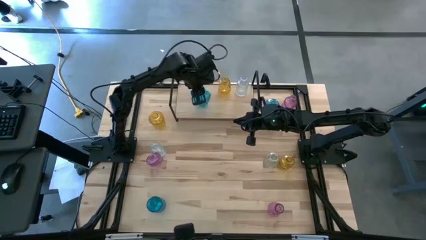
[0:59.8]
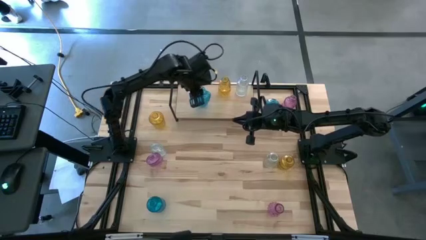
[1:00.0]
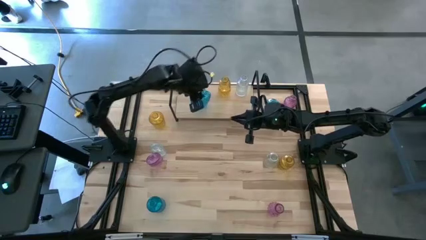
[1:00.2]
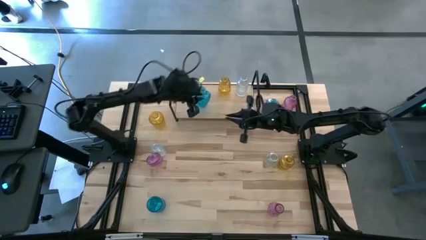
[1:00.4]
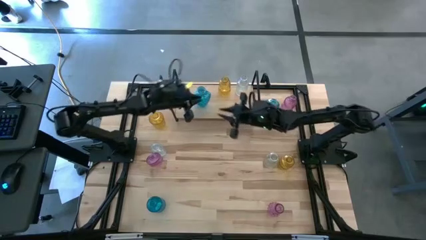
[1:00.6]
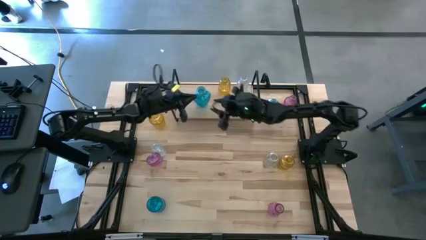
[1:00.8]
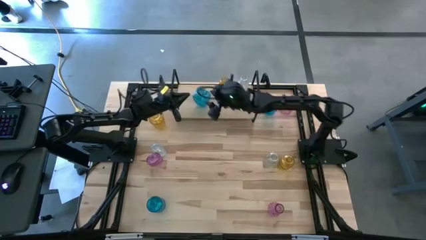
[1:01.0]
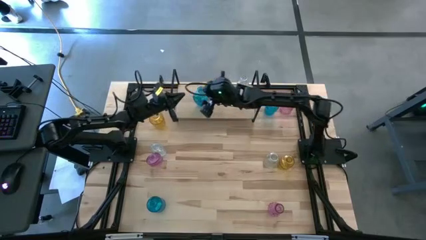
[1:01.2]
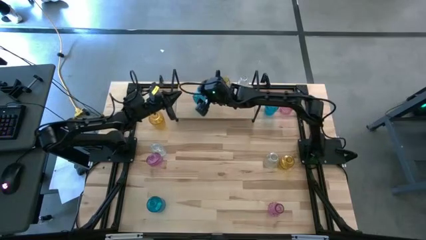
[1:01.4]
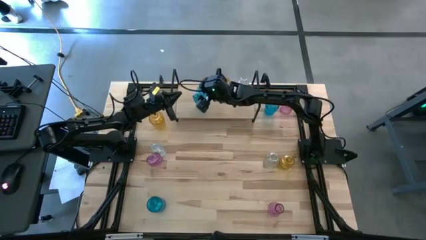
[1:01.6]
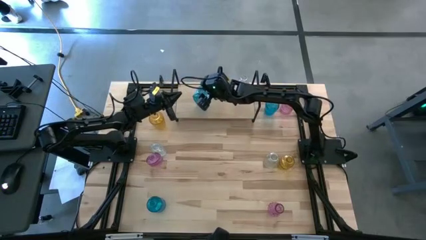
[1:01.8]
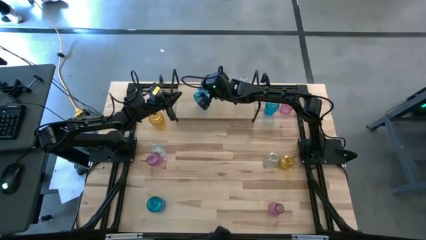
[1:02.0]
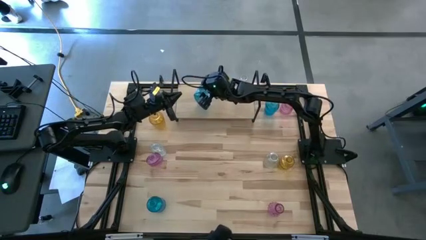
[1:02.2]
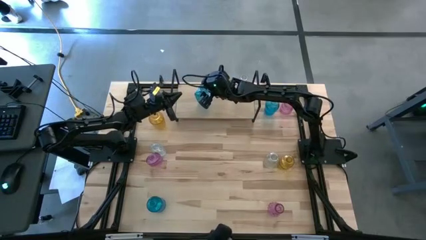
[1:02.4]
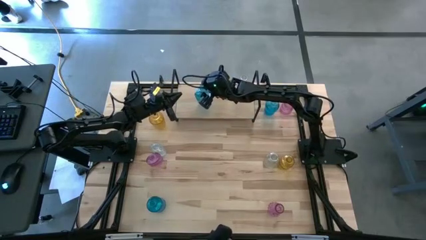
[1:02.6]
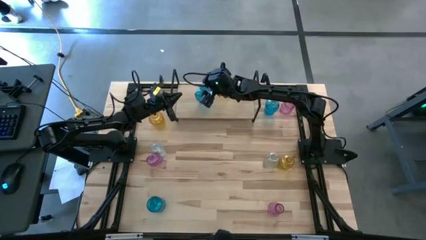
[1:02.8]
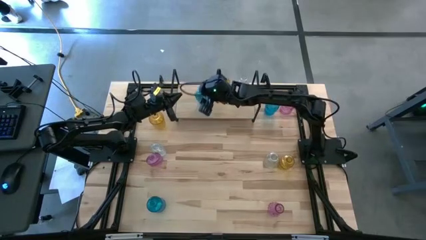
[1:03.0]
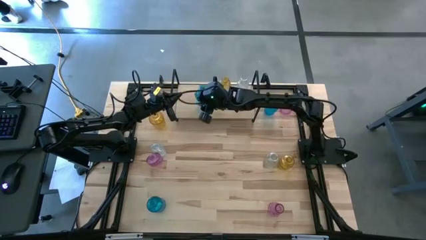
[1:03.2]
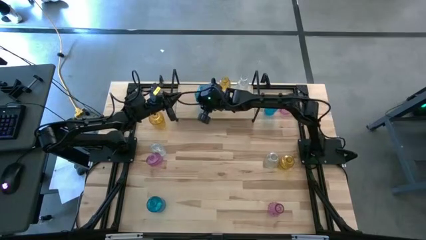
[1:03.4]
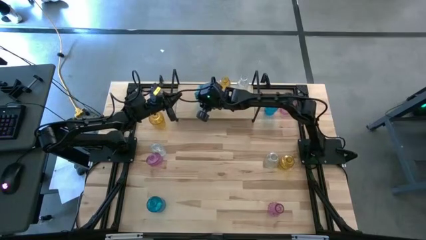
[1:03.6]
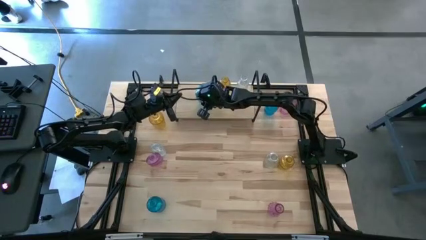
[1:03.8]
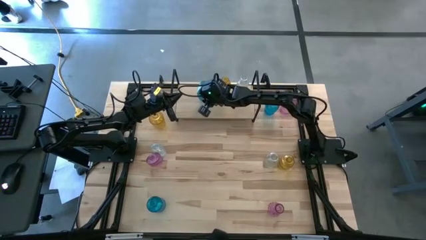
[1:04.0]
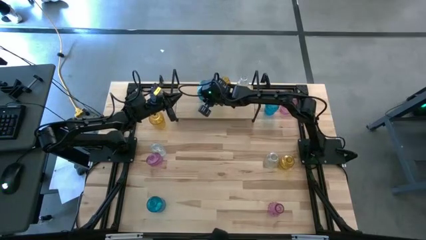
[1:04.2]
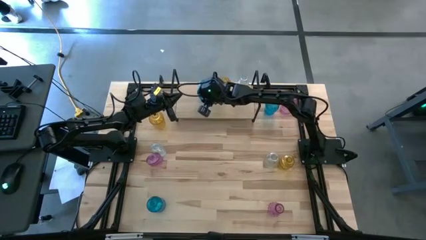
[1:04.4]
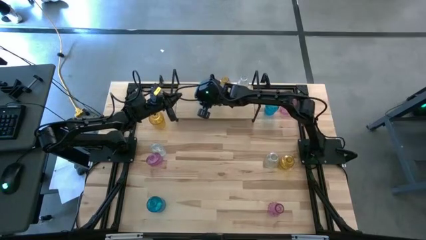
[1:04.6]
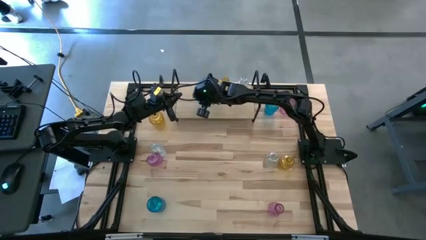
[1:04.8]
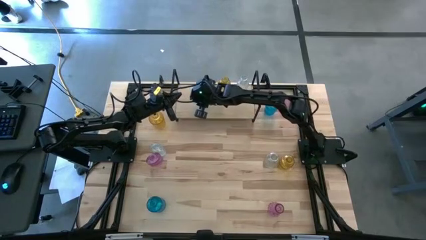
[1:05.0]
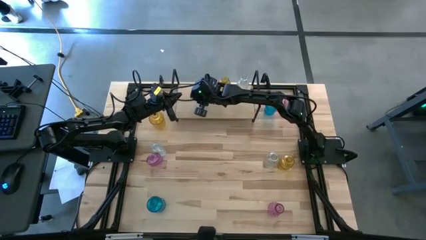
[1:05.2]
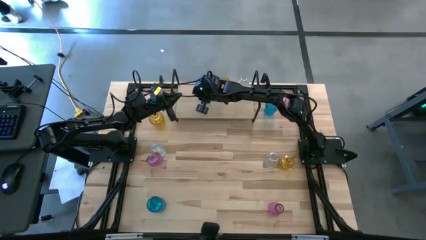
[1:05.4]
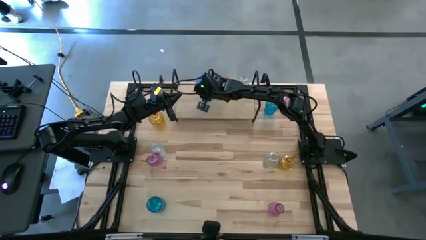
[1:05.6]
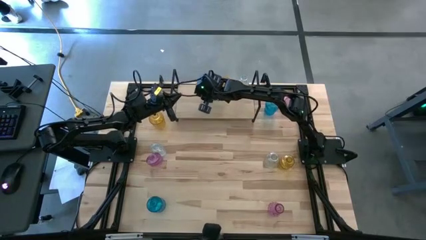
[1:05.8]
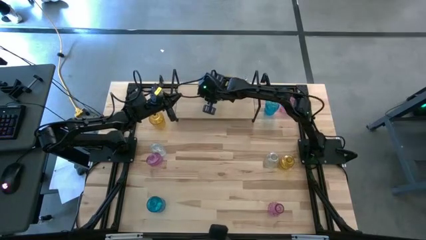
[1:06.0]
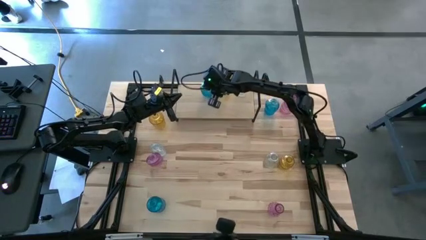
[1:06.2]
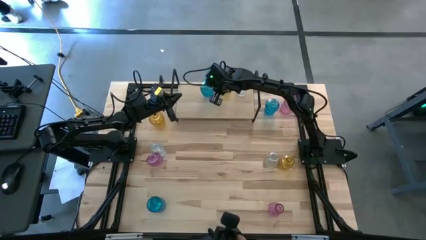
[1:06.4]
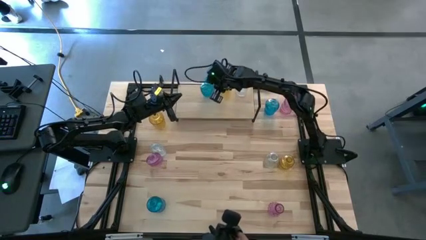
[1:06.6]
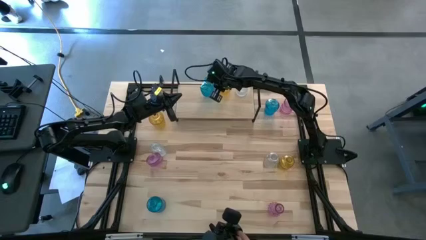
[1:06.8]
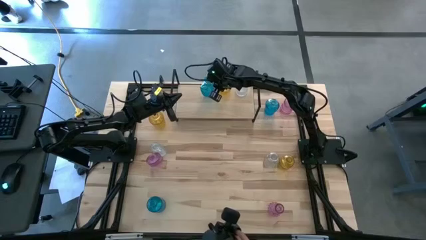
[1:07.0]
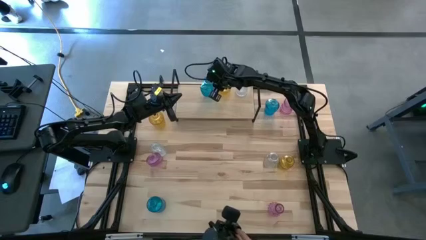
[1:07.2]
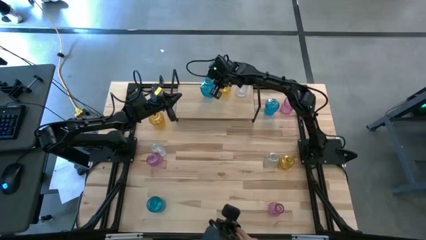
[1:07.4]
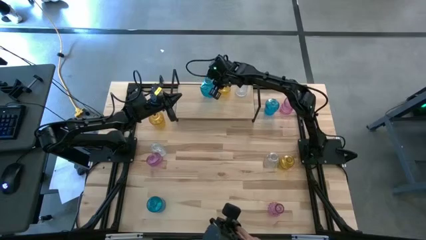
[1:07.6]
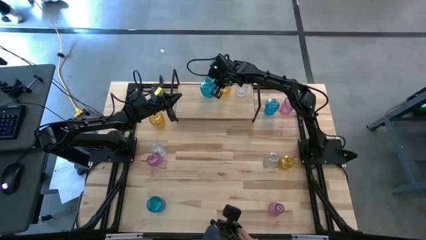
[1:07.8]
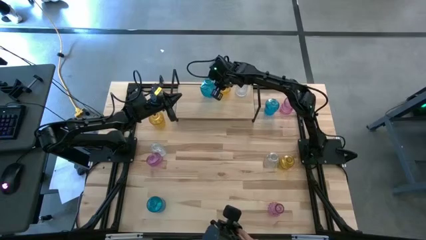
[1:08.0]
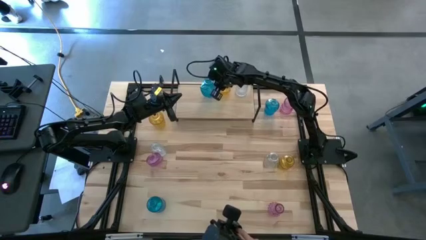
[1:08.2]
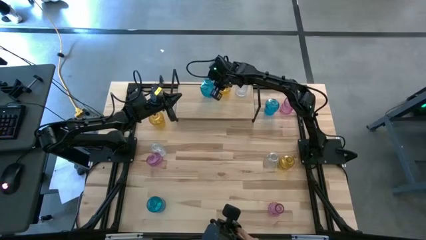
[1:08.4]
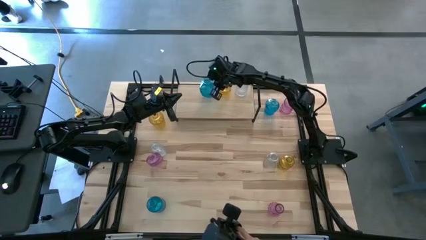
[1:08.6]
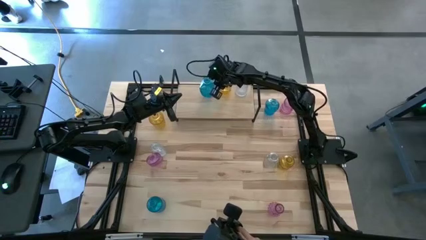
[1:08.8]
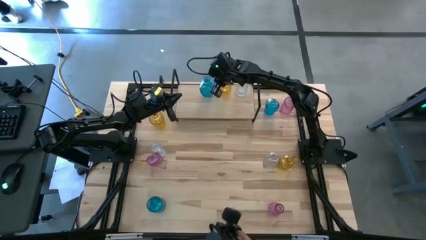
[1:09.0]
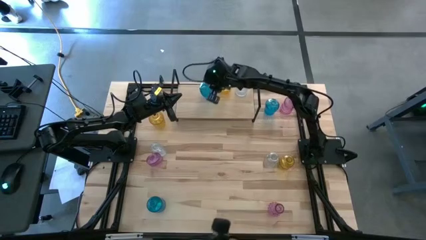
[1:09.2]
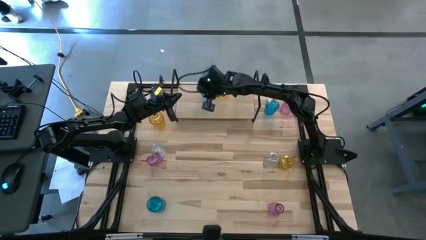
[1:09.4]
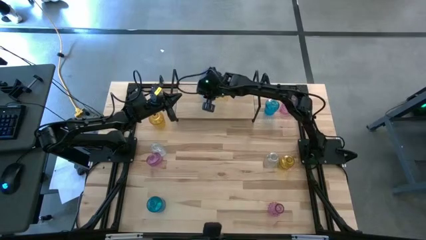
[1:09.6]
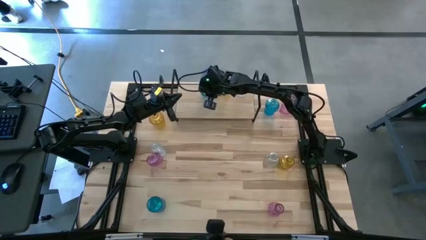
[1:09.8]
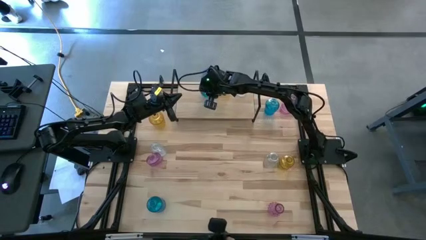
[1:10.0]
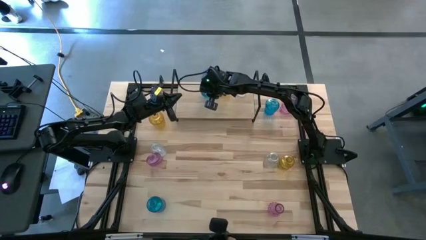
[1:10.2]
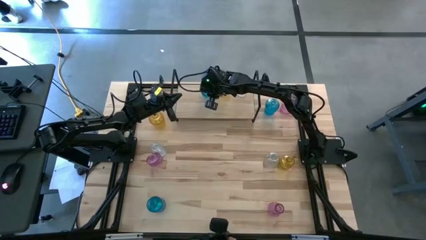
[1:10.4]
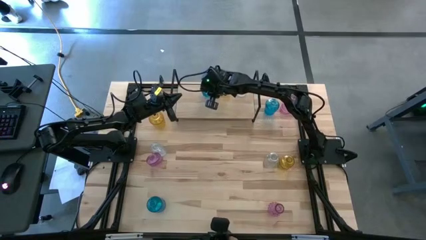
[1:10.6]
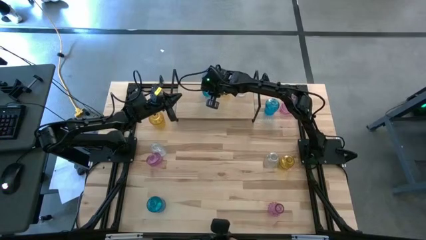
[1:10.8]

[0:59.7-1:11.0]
Task: sort vases onto shelf
Put the top left blue vase on the shelf

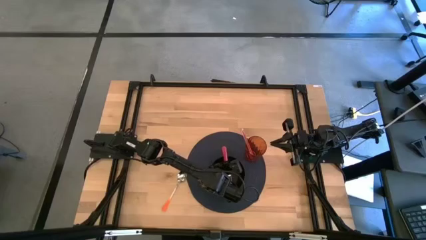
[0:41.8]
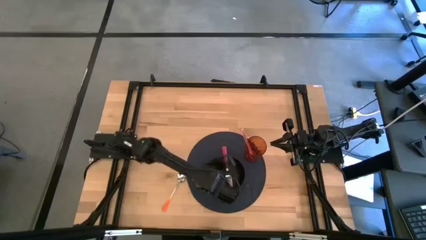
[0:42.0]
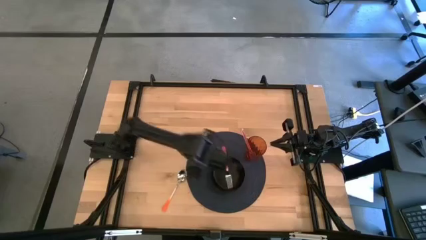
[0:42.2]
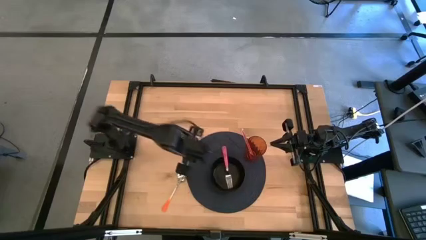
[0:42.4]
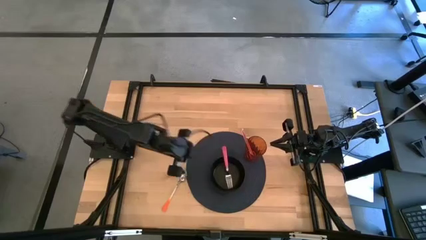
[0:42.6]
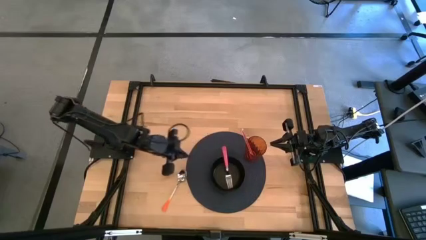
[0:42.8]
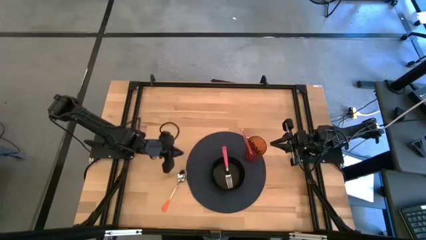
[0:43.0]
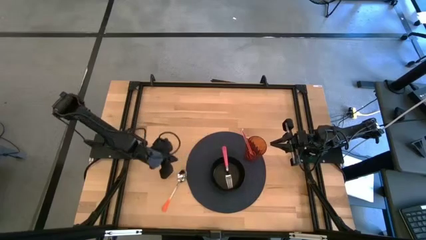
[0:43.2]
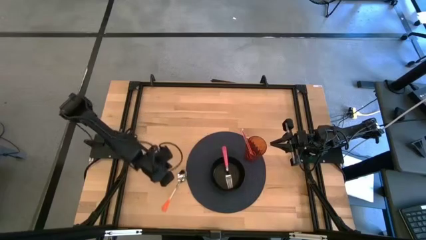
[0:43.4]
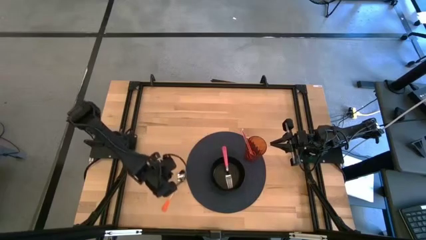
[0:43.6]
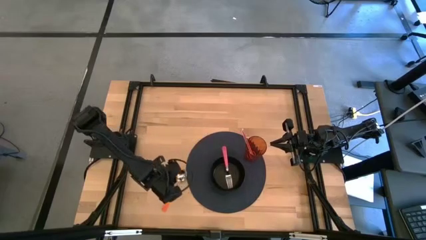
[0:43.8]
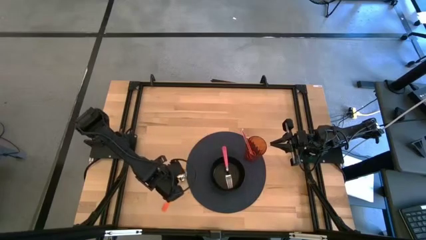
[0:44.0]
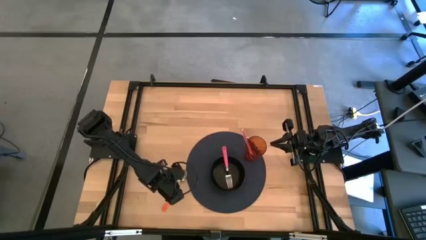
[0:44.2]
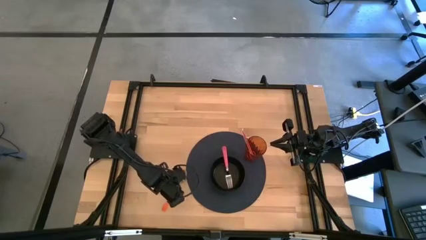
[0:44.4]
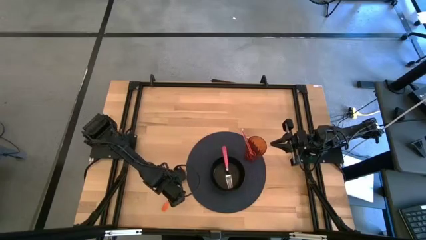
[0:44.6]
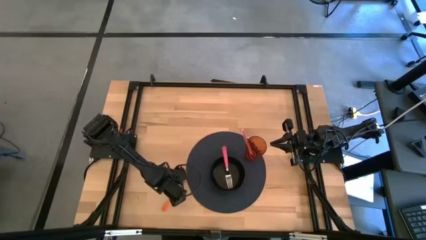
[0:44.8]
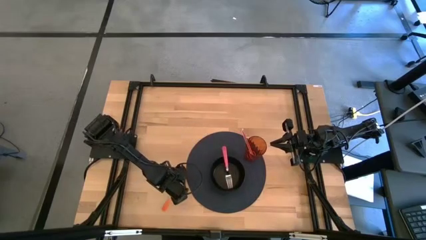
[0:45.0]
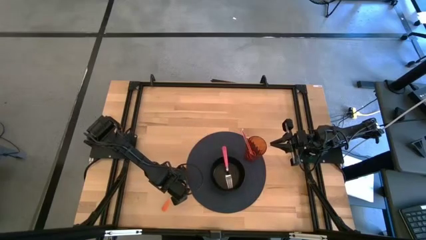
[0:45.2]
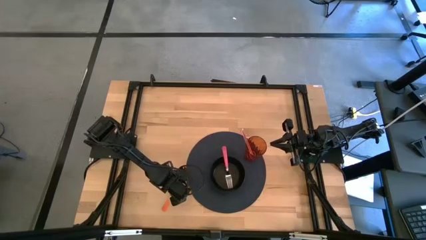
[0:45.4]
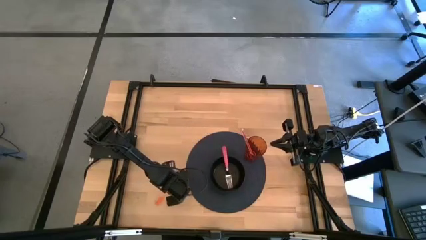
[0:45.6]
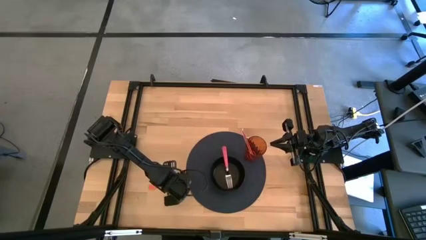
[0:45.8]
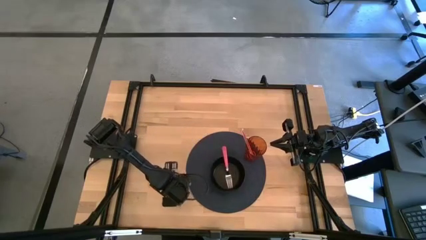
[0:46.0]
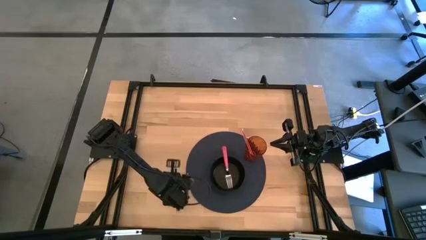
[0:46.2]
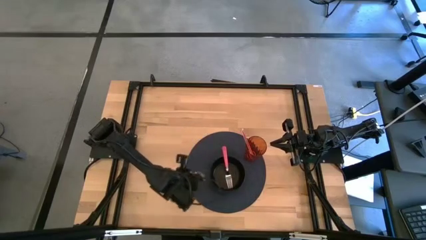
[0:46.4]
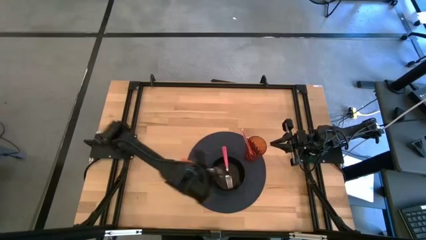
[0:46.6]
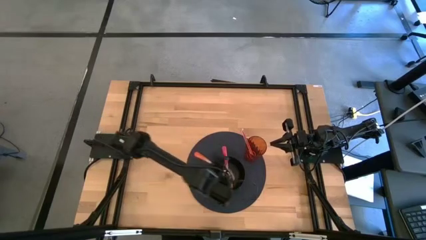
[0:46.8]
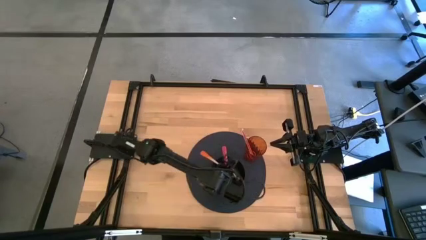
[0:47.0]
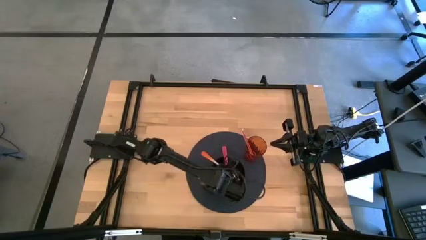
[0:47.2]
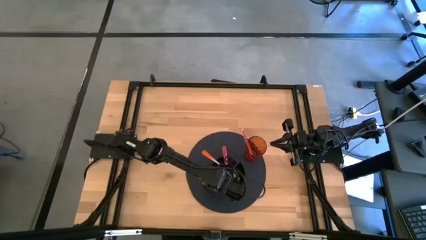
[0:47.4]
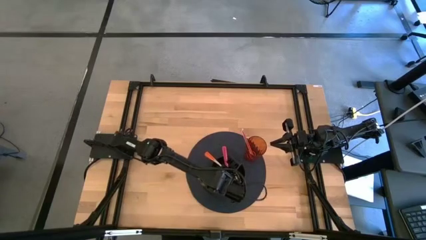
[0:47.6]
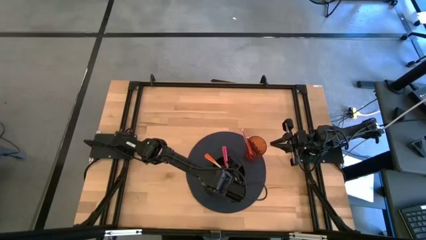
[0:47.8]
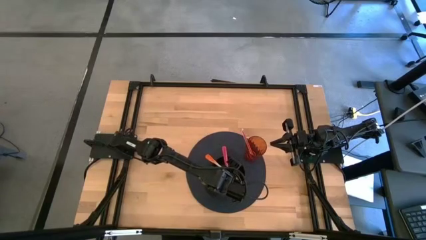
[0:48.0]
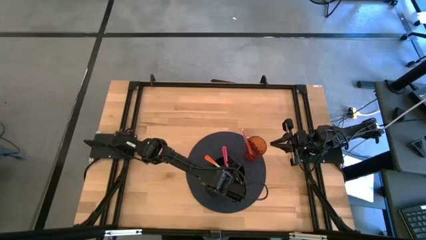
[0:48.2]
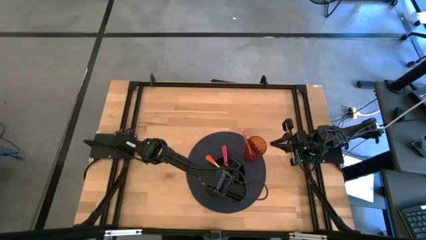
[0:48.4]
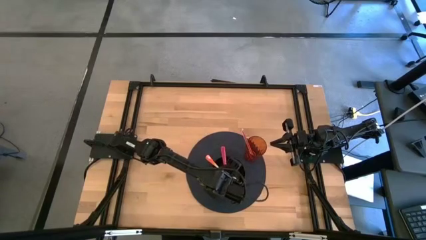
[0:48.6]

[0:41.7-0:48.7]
Task: Pick & Place Utensil
Put the orange spoon into the black bowl on the black mat
